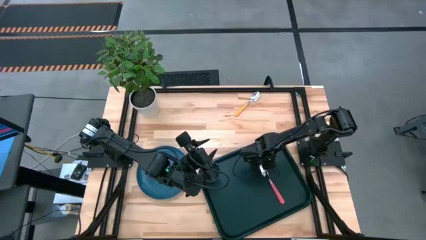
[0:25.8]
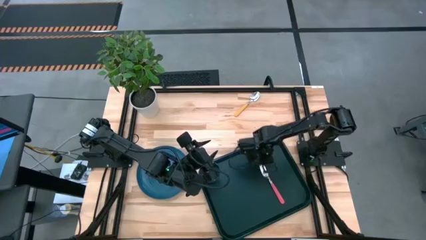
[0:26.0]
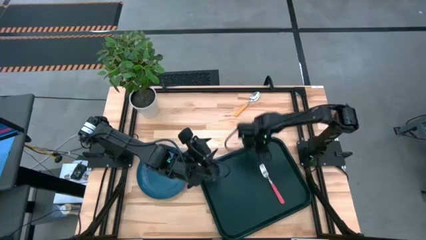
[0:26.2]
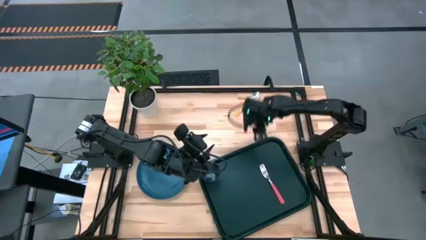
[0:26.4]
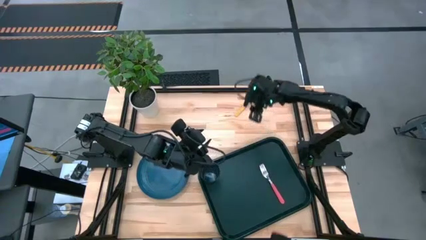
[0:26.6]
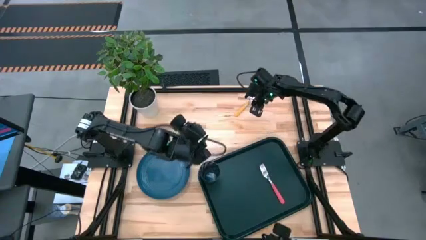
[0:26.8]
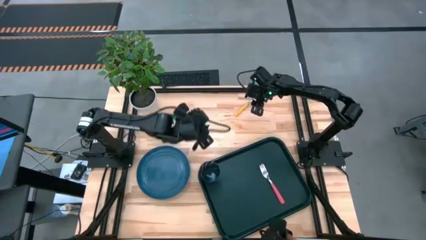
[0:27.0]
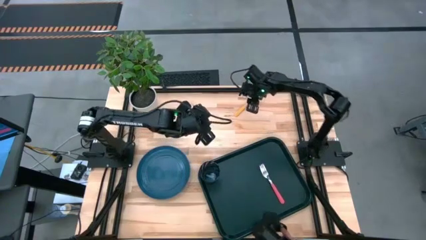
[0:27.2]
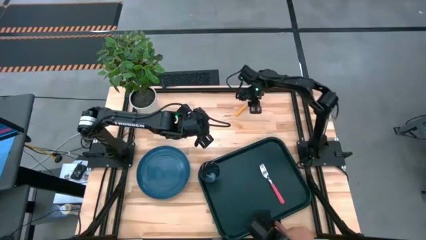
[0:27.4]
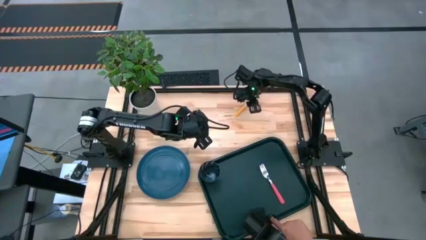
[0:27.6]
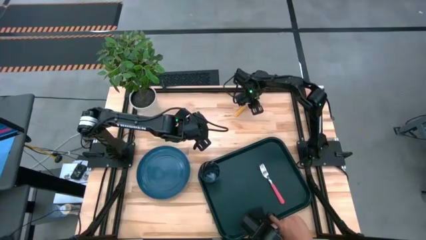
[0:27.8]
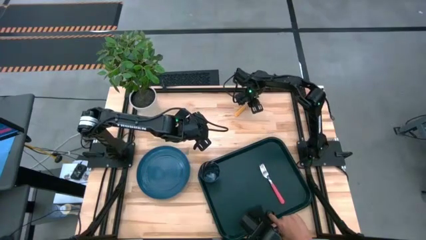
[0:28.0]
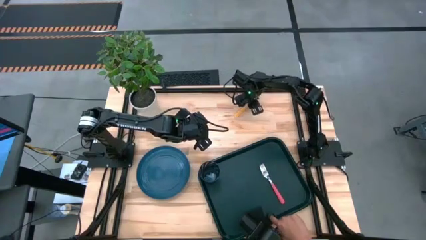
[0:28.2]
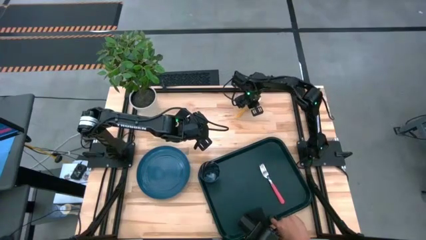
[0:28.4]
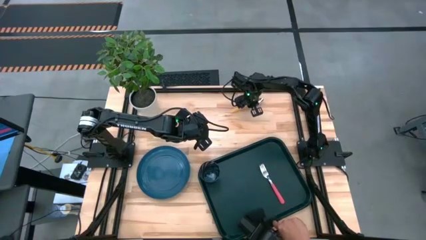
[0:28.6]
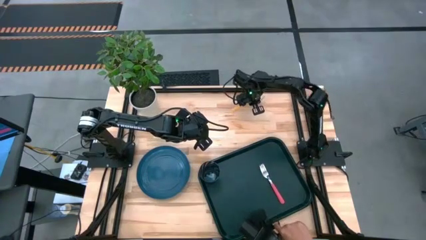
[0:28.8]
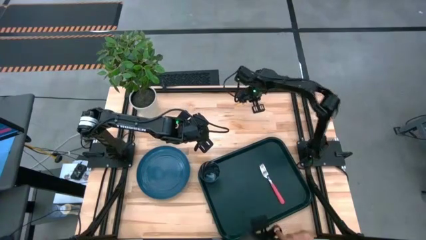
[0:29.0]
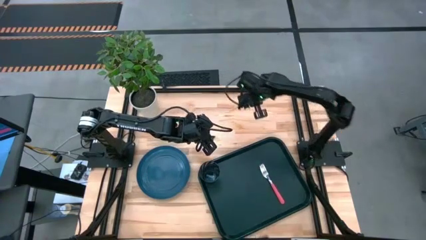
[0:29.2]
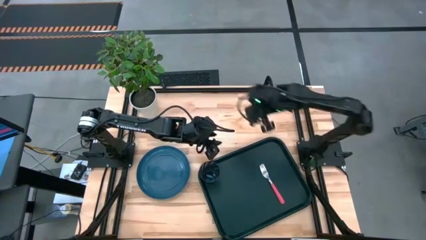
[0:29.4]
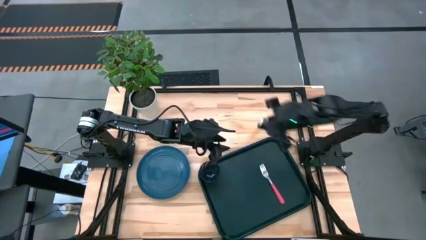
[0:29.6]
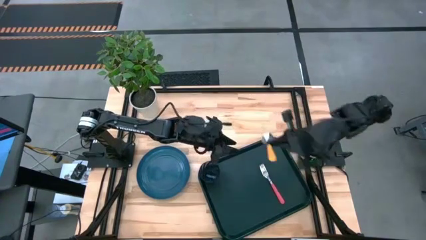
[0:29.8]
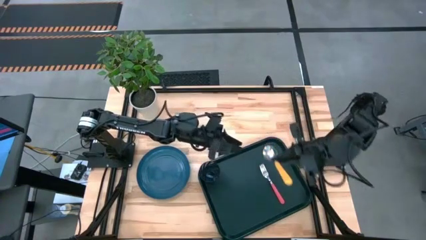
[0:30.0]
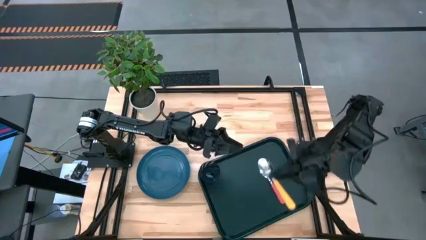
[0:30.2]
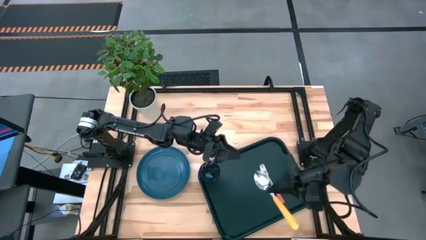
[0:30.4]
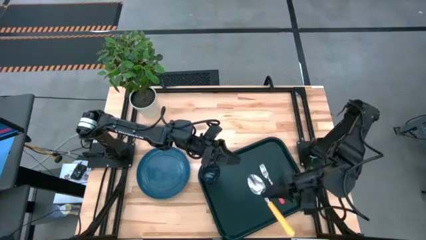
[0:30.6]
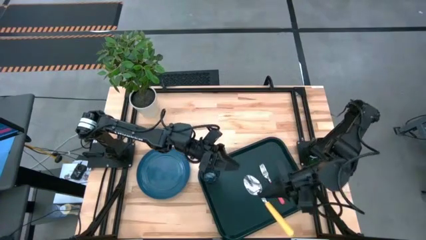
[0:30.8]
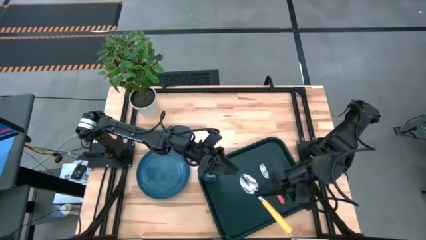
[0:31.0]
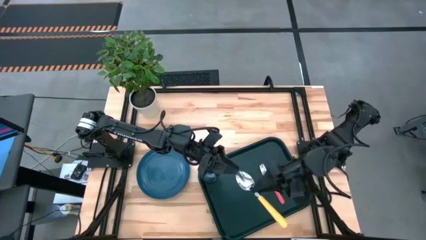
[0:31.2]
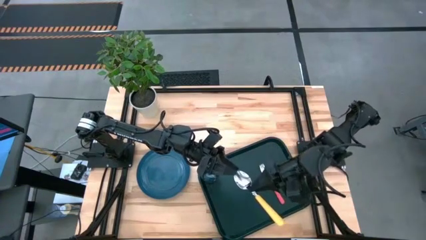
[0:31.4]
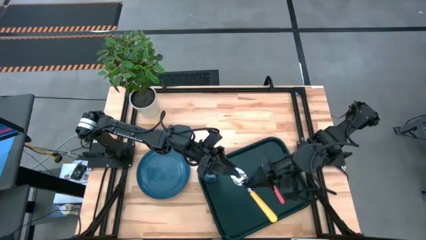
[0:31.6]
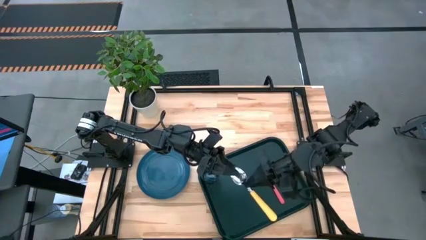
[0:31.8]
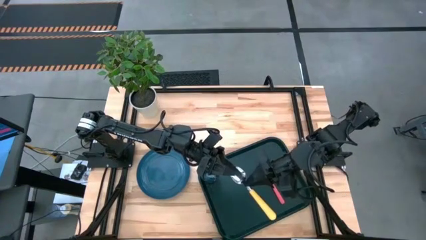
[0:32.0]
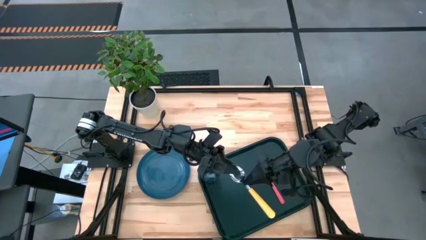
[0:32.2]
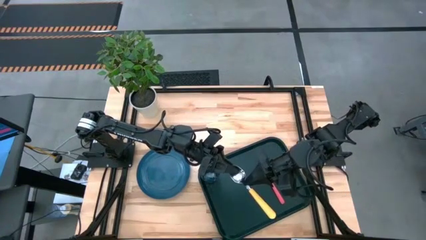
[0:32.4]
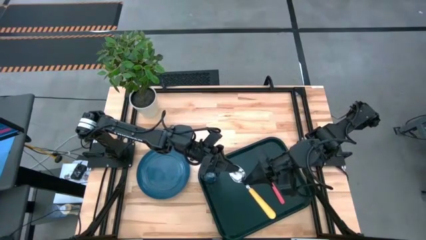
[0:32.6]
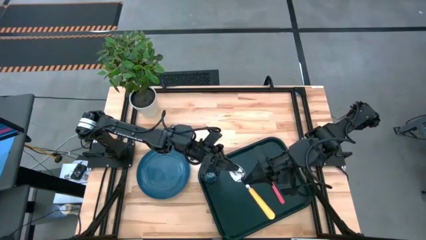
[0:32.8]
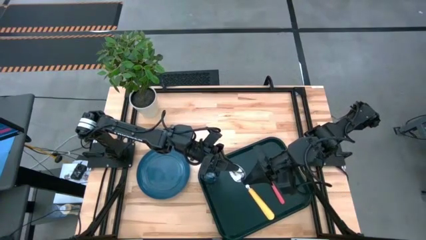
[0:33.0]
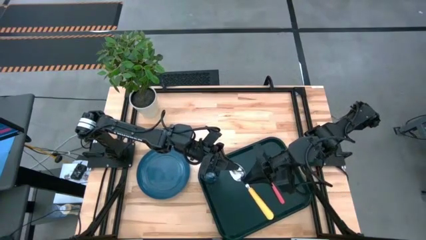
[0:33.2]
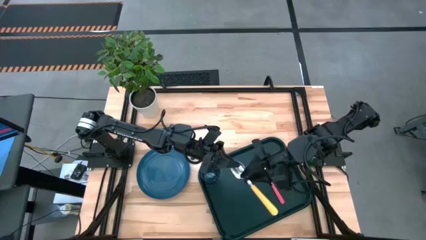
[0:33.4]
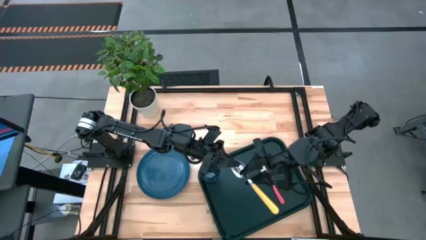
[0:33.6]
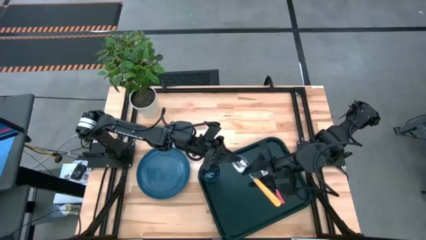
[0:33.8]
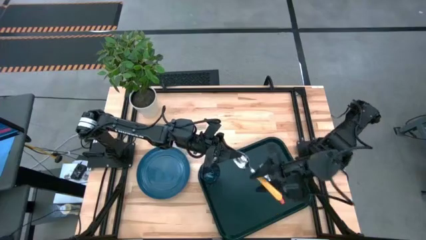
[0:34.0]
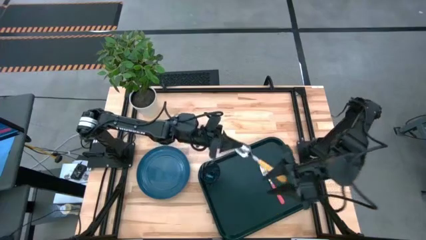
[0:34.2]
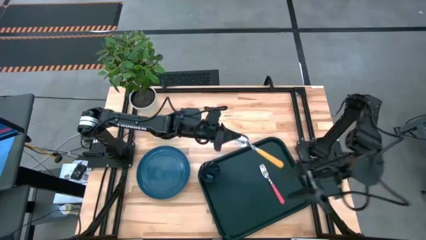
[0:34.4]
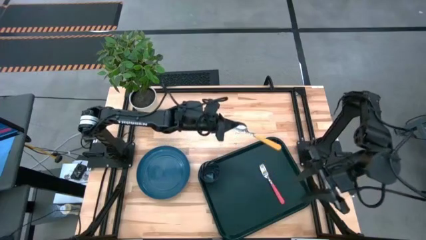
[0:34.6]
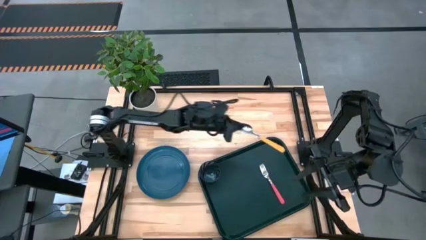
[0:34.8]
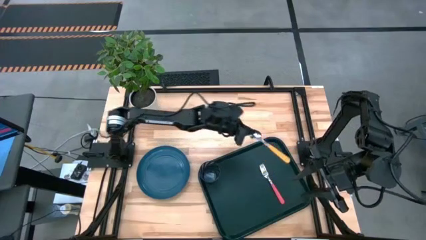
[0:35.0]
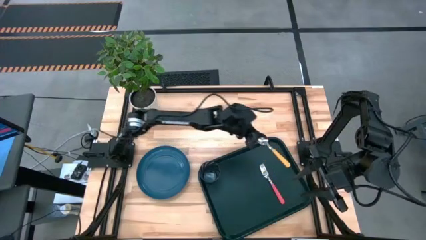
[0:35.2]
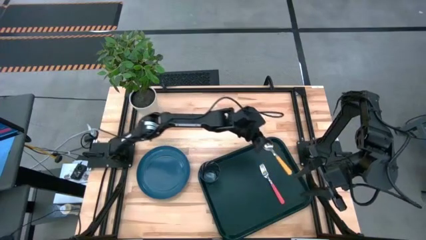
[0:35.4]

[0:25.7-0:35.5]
Task: Pick and place plate/cup/fork/spoon on tray
Put the yellow spoon to the right of the pink fork on the black tray

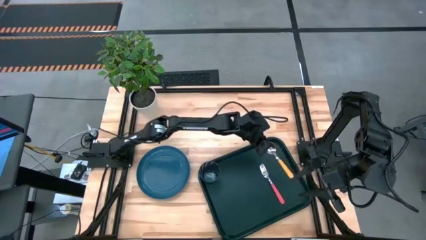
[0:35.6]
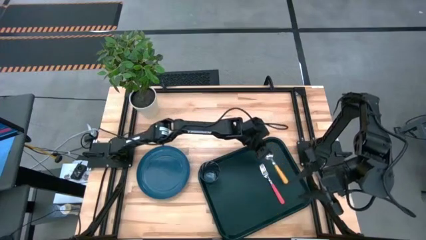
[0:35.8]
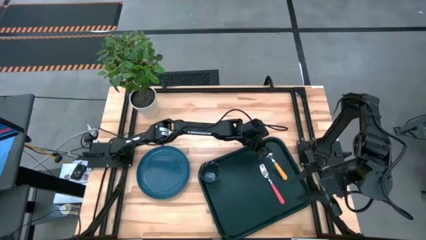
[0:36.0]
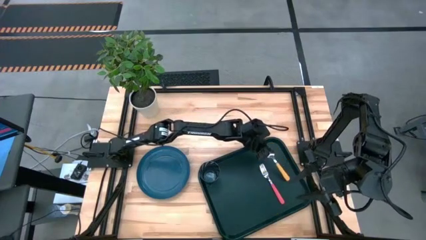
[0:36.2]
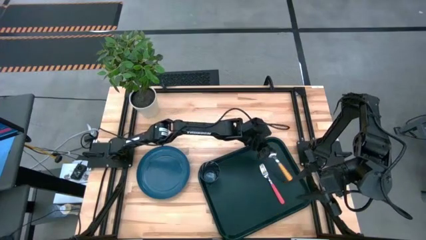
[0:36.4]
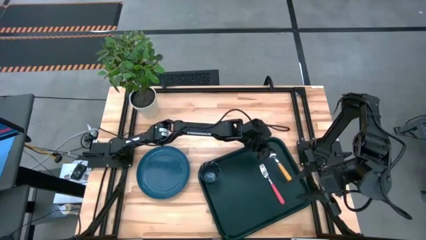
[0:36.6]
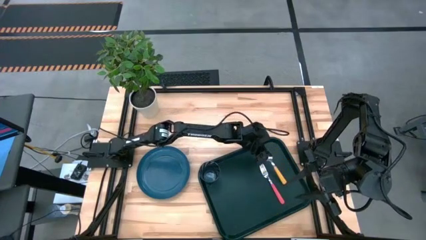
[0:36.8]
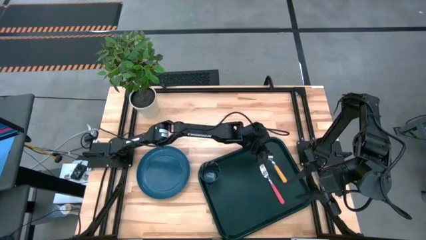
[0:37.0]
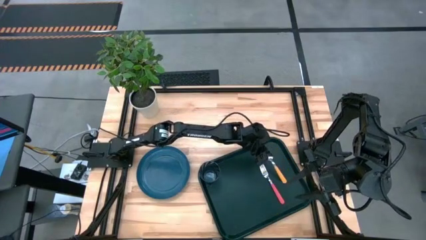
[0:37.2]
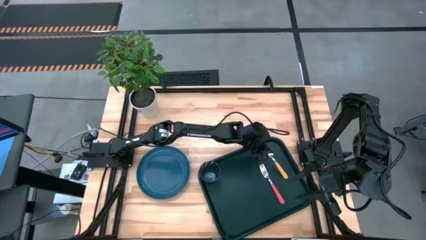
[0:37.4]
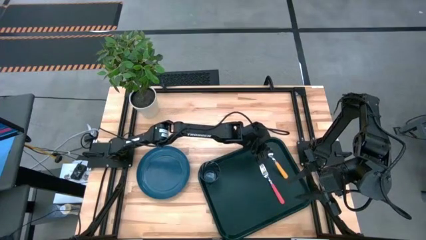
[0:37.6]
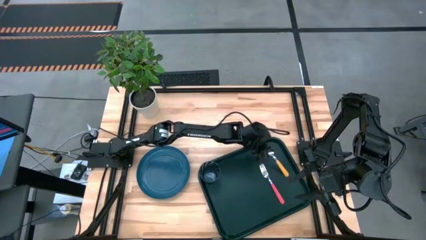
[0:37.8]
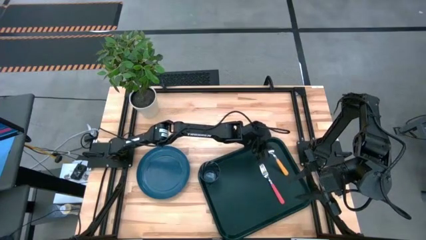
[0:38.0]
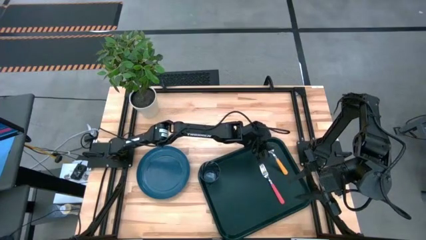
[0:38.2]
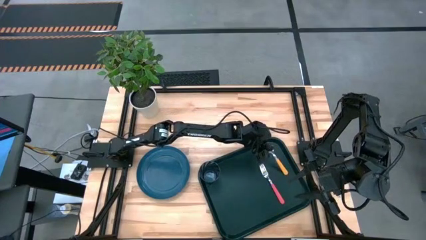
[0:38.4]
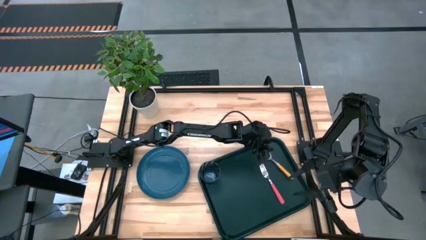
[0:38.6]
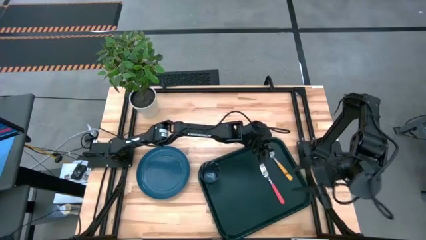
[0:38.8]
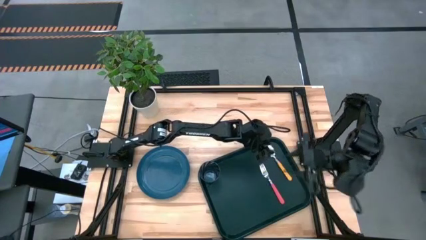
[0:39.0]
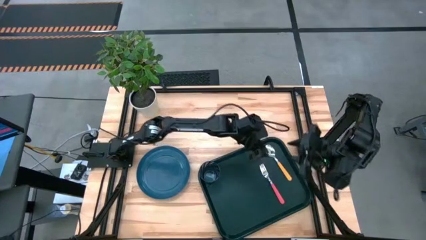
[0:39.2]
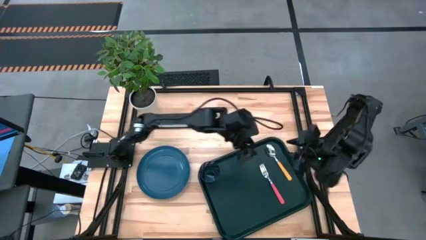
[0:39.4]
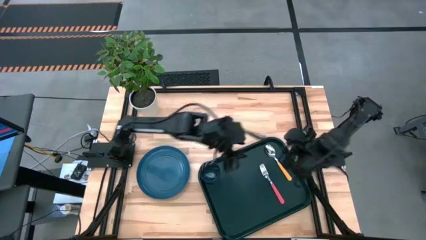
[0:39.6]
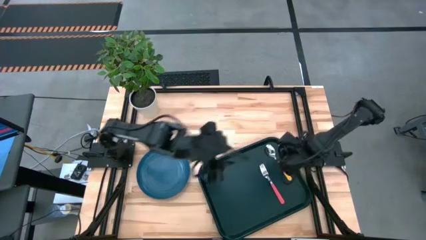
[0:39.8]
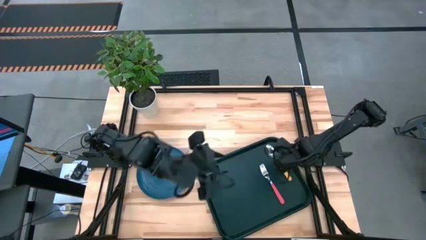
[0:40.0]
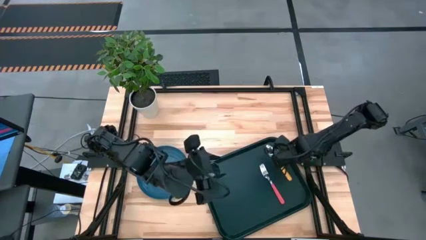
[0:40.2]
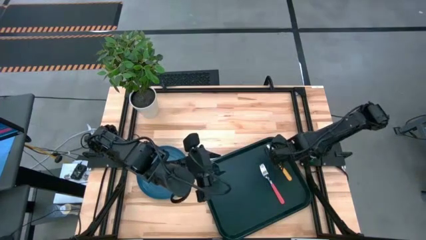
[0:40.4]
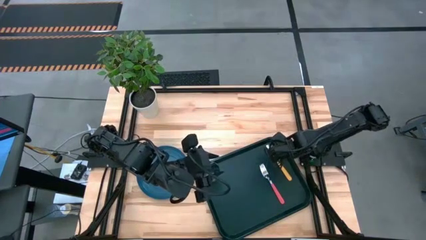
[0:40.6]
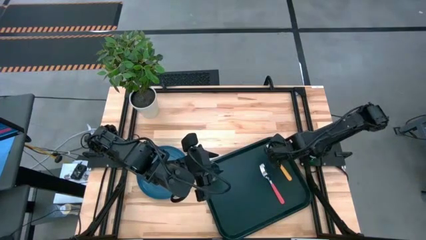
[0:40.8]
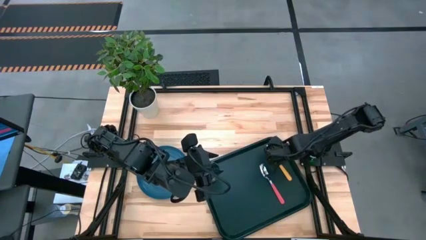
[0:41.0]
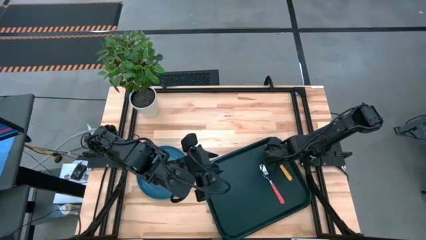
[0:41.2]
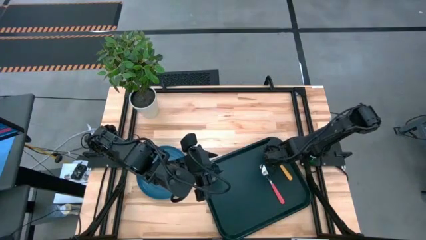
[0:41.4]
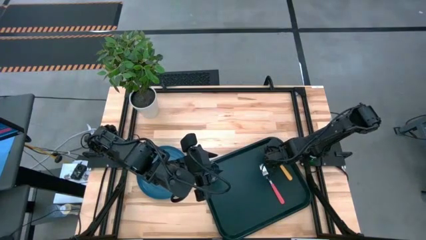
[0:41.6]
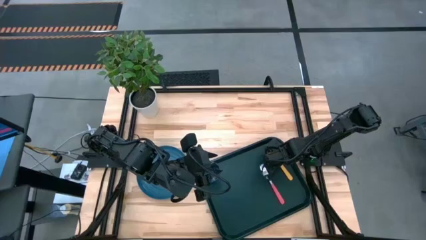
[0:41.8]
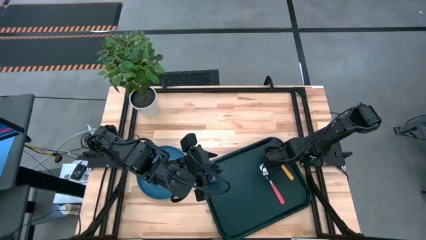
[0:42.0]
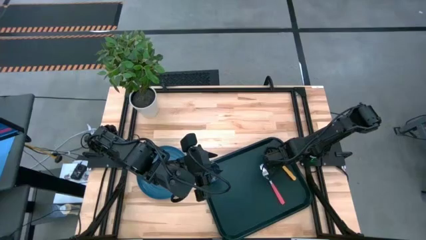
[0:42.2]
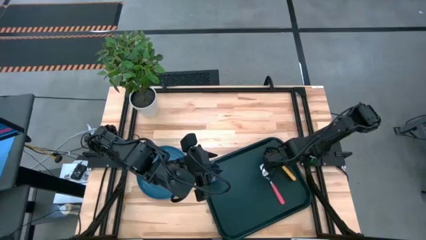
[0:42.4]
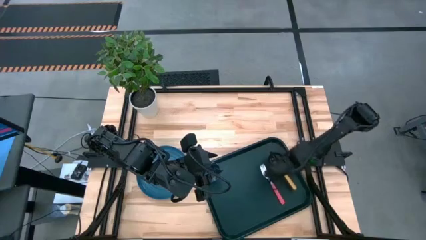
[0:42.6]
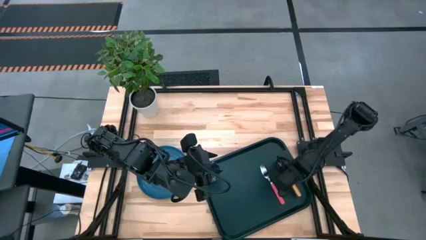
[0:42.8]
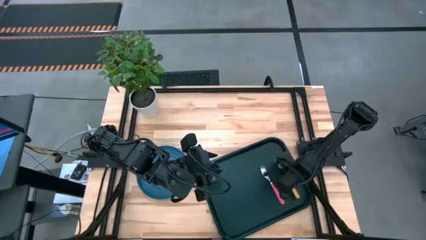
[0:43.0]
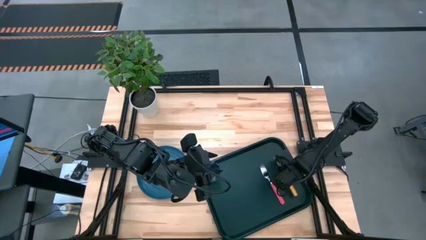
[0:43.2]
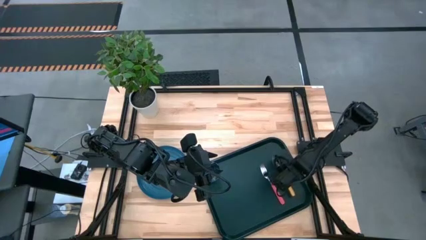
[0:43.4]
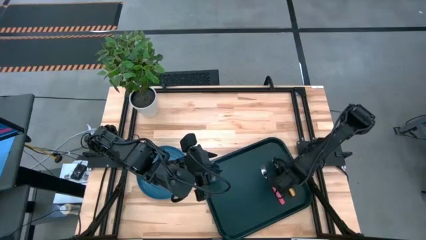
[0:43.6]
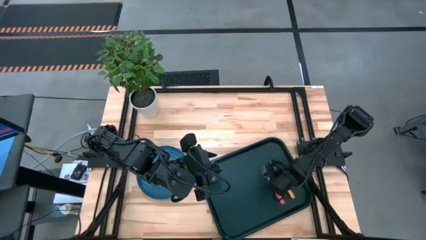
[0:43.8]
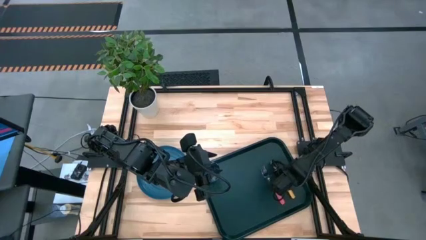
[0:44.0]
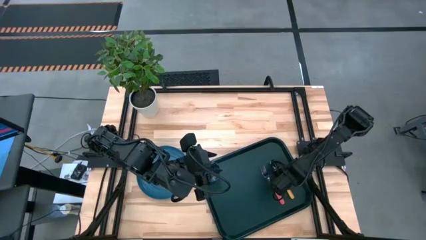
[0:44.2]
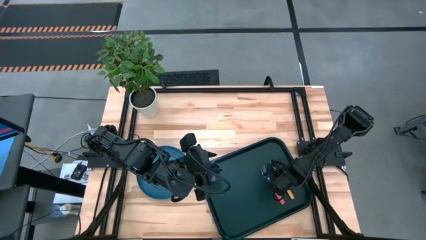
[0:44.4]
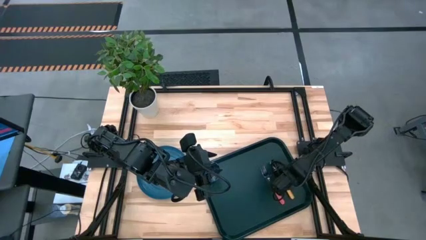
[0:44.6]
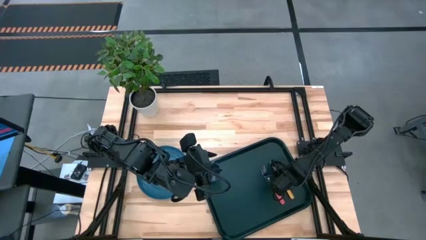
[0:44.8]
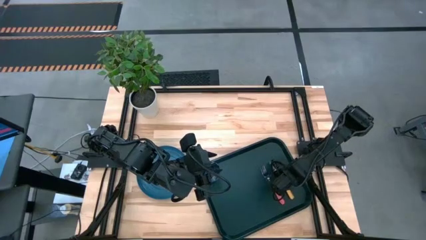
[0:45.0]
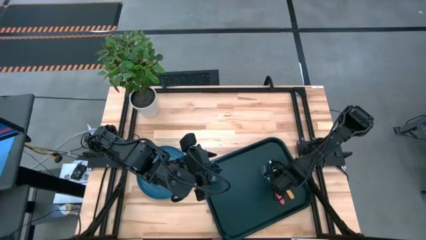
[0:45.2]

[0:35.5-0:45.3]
Put the yellow spoon to the right of the pink fork on the black tray
